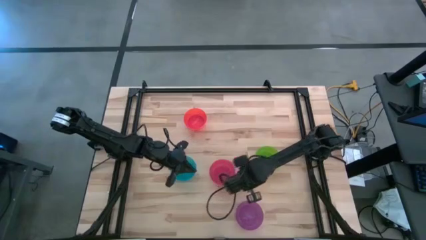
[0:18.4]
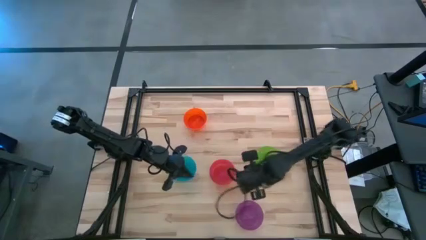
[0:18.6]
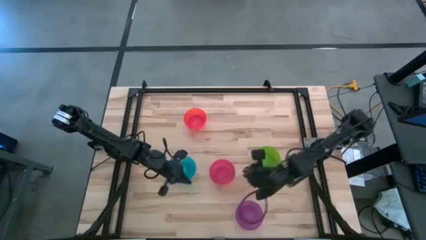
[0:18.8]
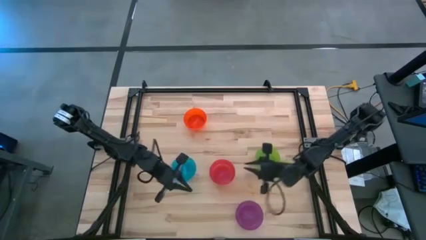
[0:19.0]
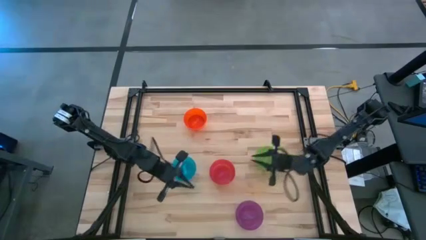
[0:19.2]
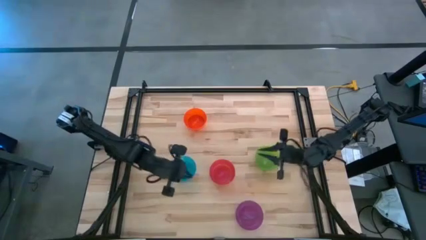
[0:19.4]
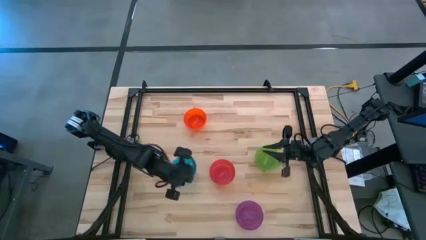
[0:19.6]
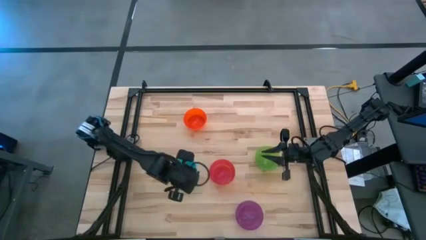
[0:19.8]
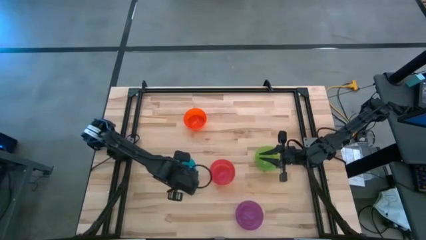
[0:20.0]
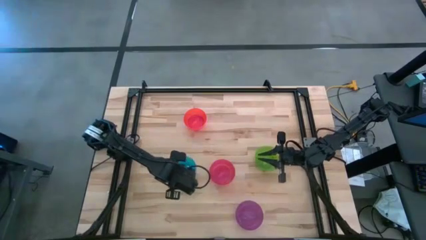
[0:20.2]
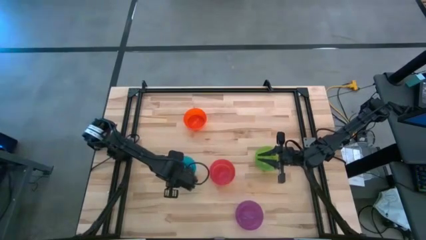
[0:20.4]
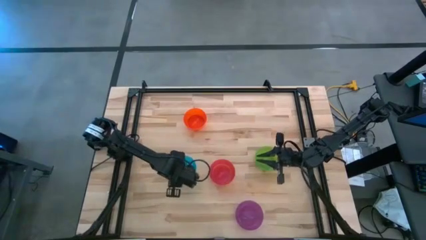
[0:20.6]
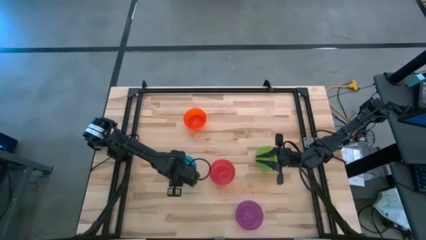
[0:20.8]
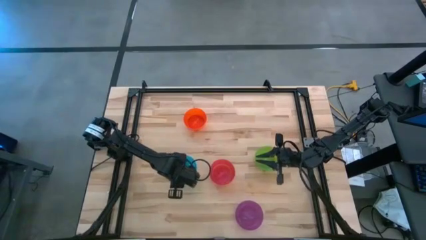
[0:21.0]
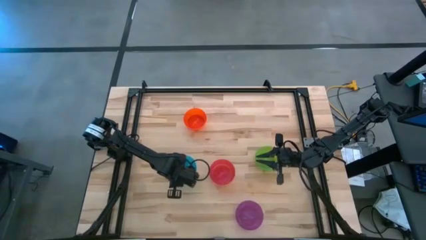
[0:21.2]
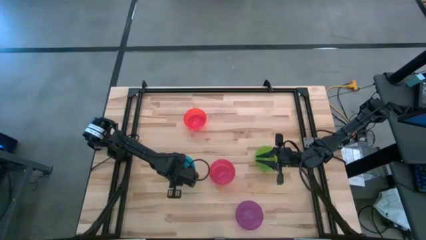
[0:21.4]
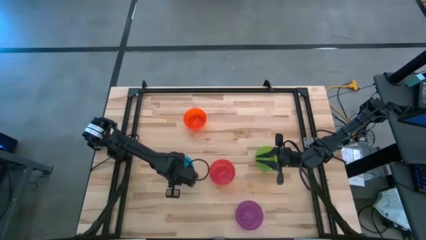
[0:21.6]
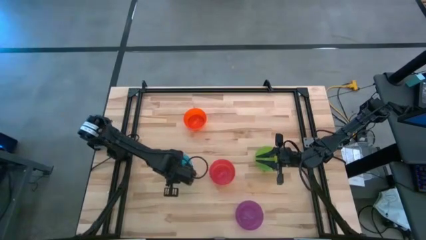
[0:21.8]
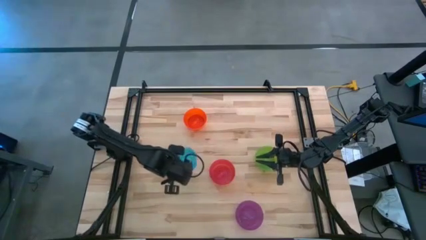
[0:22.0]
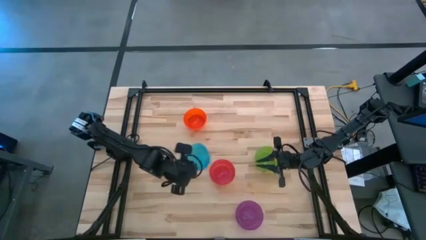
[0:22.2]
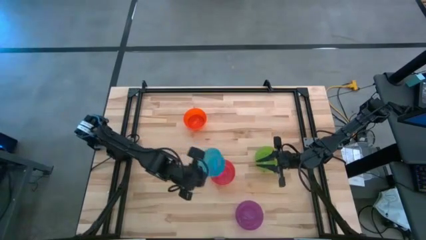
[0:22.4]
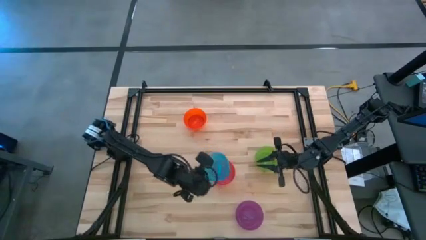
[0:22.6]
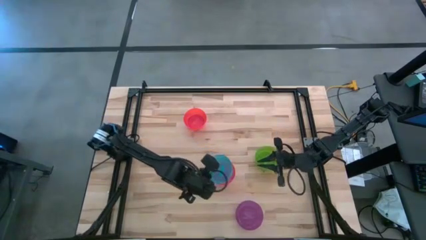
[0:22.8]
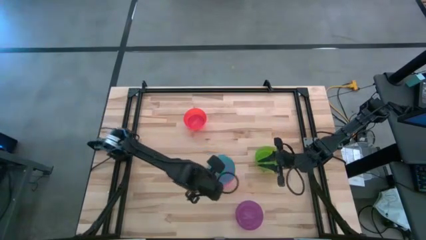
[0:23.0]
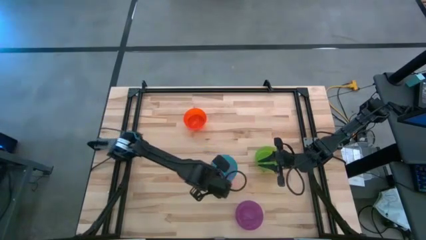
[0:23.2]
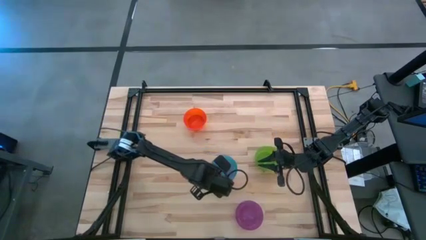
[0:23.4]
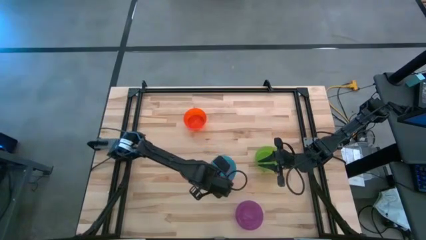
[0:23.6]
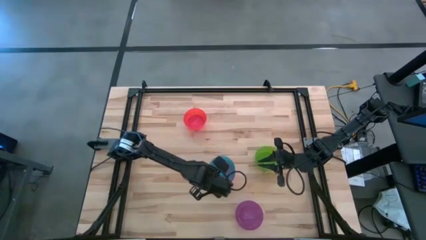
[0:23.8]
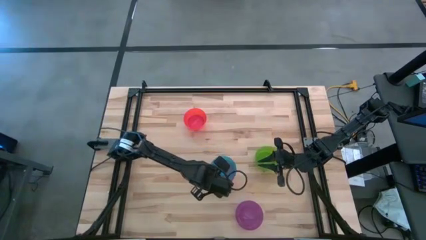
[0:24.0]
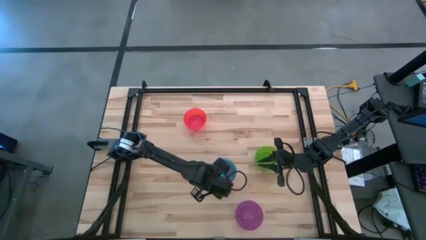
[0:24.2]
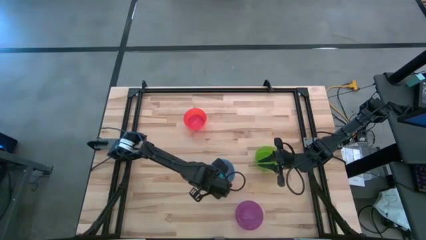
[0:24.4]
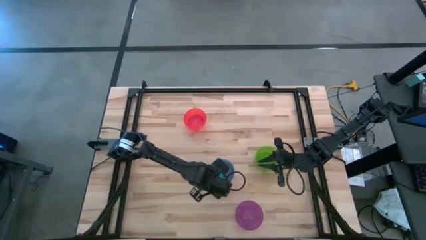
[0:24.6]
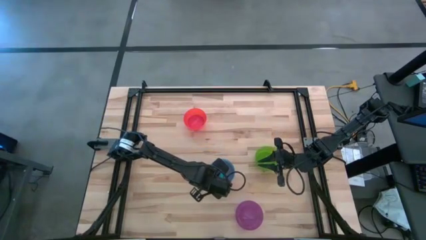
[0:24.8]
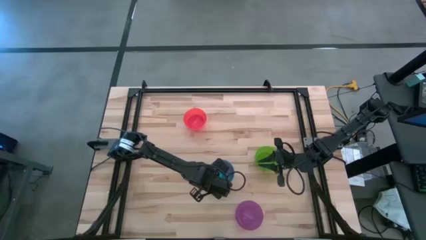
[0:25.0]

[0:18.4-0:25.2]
Task: Nest bowls inside each other
Stack the blue bowl on the pink bowl

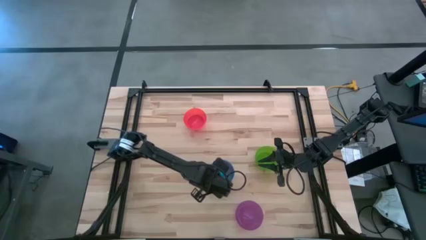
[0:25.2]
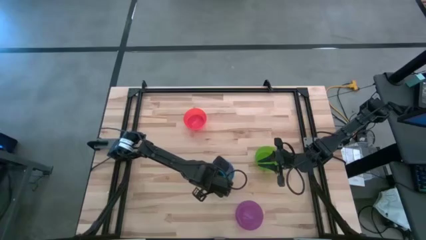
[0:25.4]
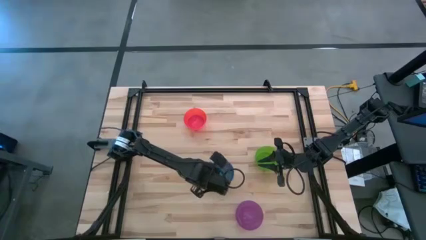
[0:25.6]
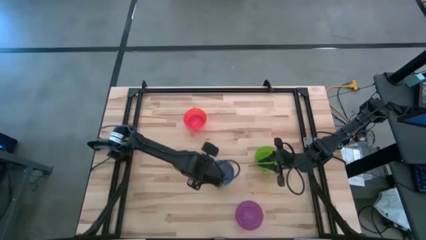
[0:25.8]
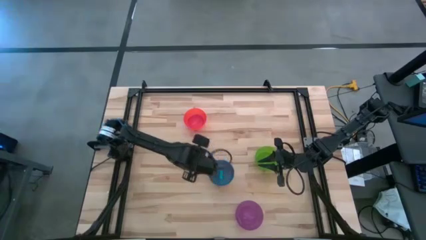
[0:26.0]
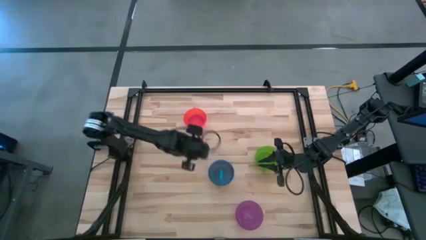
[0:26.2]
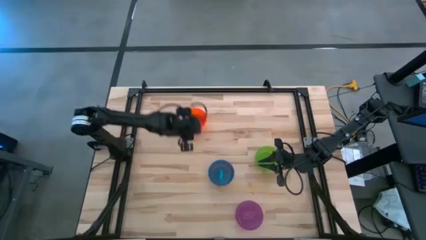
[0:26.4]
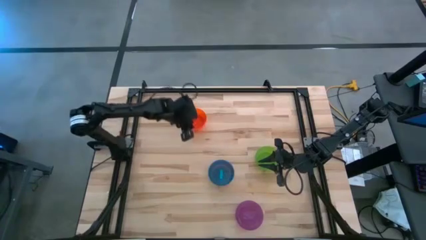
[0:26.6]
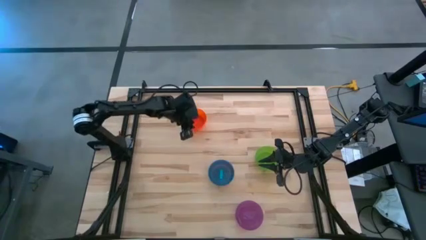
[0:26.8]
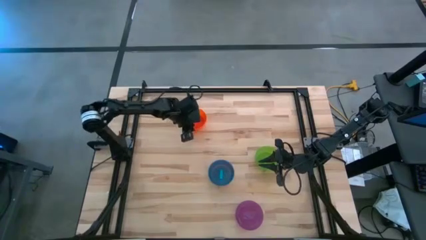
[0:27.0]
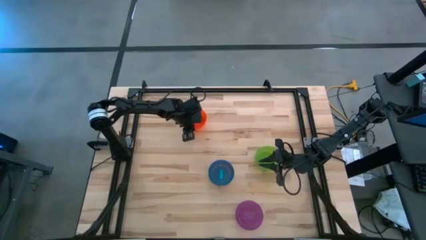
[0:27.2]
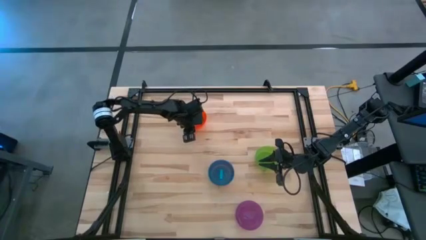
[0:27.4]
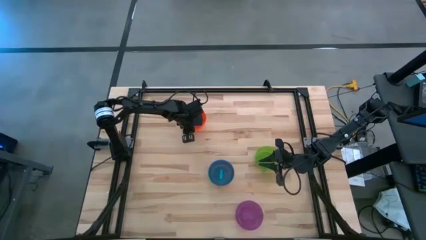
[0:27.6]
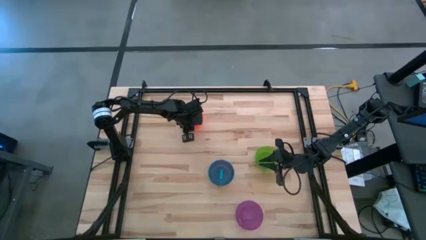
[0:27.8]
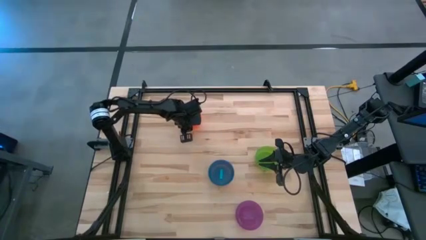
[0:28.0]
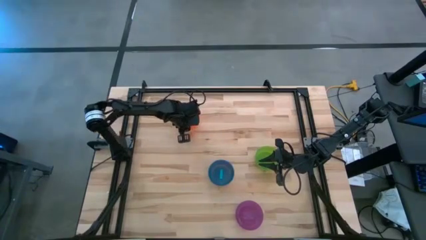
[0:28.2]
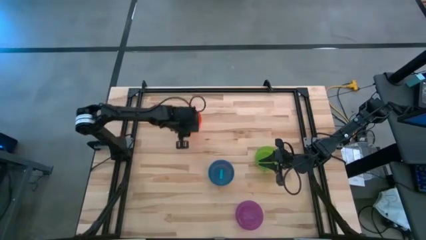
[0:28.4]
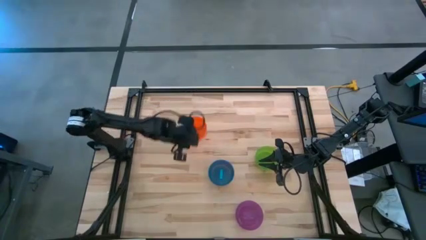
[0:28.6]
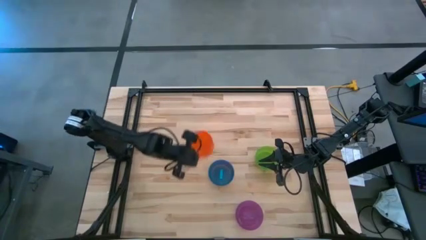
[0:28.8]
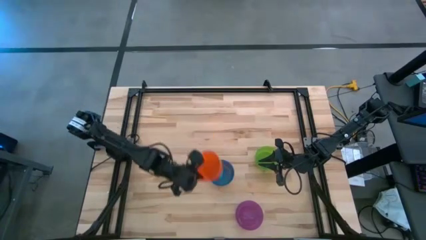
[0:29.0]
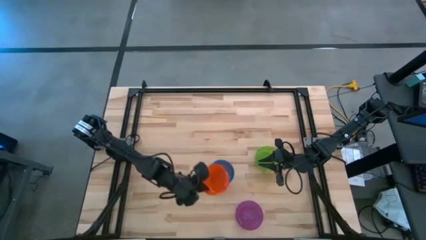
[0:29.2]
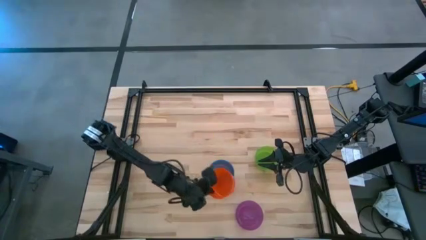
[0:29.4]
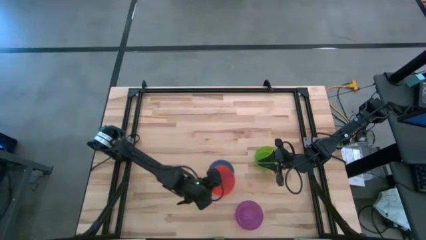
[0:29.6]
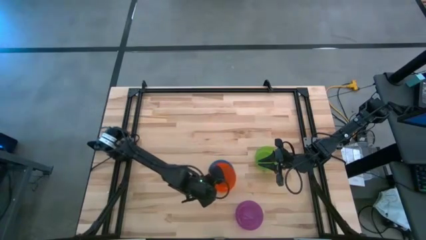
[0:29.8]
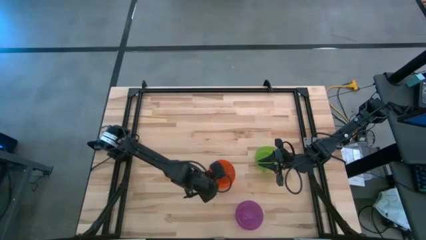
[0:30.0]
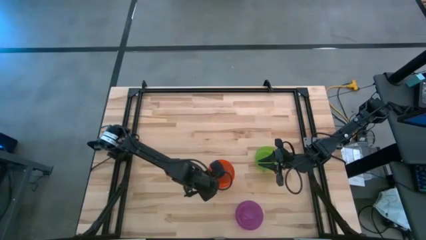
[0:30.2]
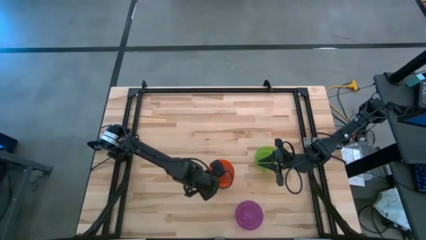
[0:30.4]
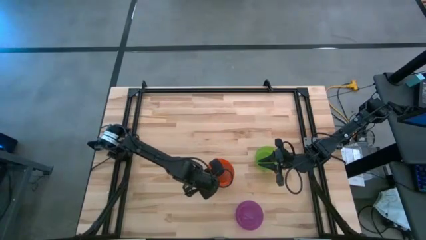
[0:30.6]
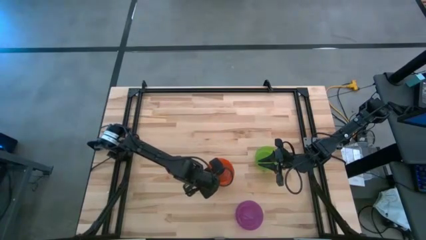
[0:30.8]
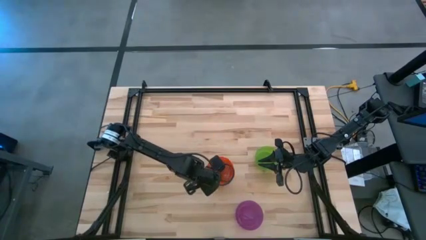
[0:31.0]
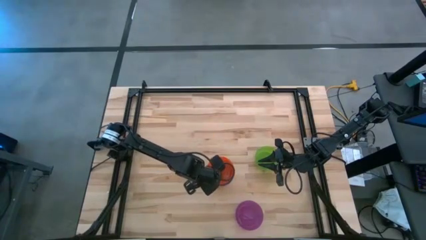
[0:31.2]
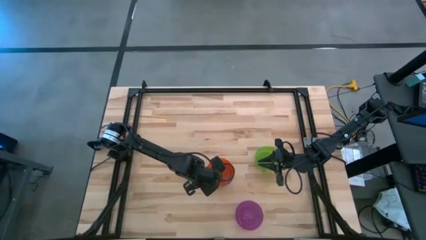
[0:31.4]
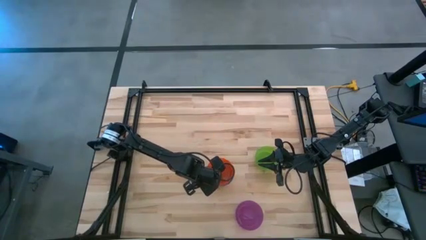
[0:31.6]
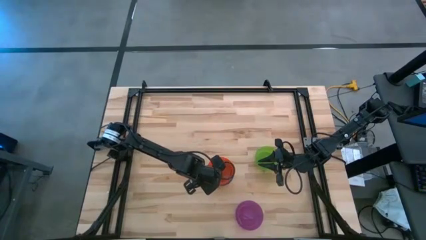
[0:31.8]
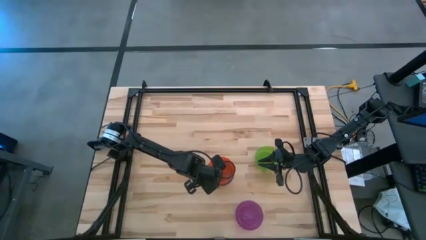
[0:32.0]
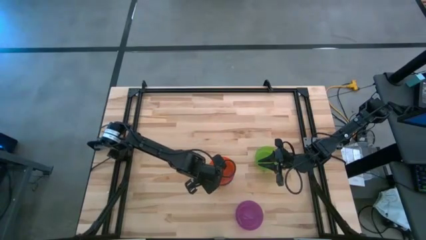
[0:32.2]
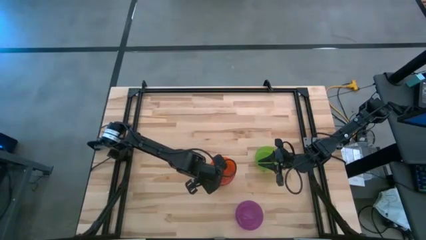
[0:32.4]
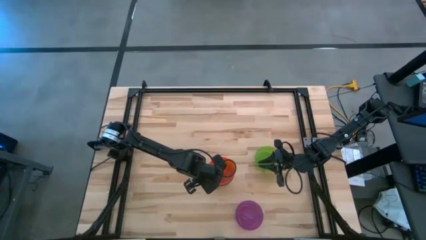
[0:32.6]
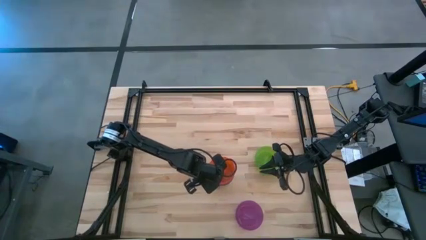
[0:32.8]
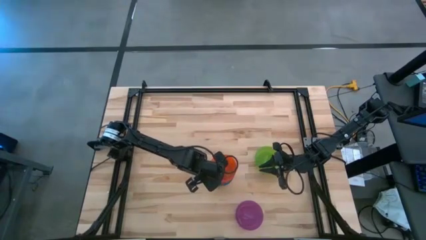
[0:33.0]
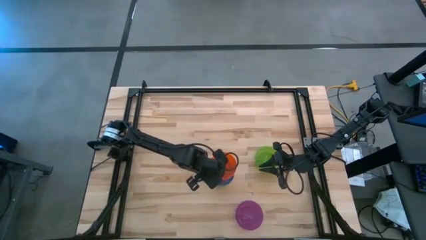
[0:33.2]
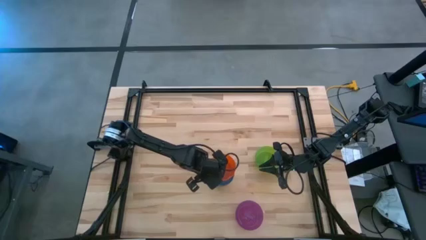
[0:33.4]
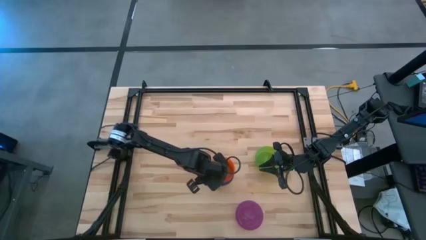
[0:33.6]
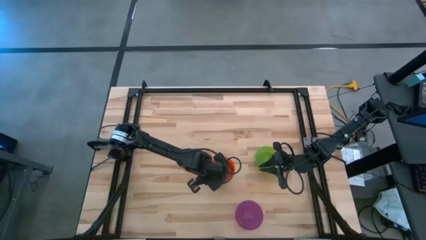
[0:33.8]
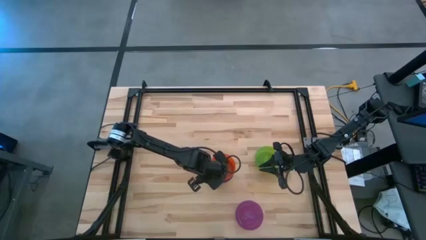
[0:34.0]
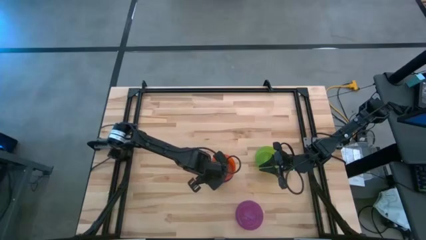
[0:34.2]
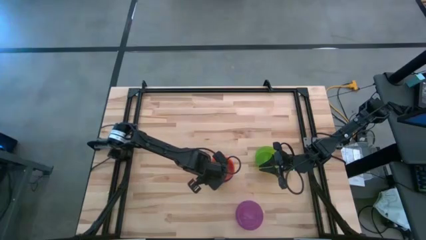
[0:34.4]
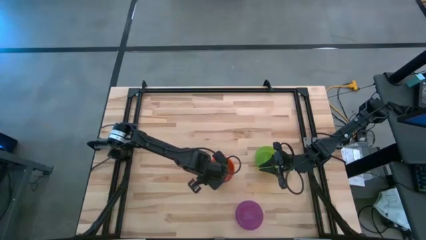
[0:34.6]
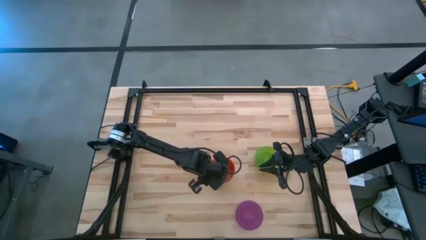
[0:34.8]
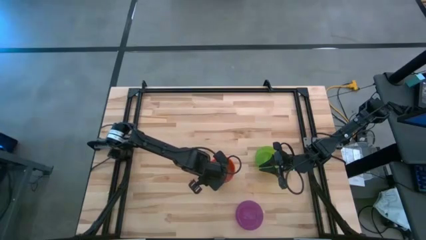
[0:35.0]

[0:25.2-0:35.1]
Stack the orange bowl on the blue bowl
